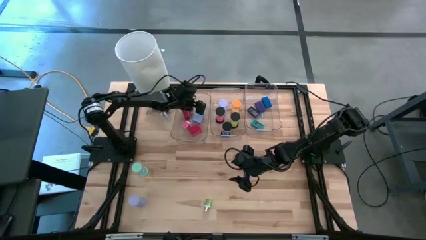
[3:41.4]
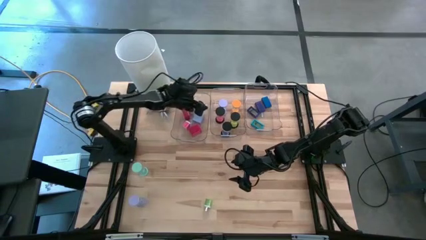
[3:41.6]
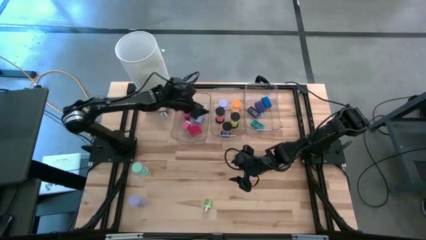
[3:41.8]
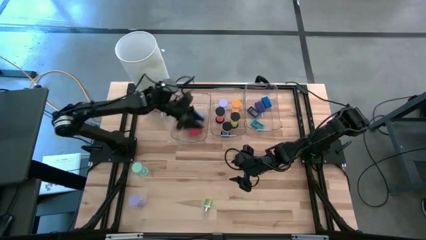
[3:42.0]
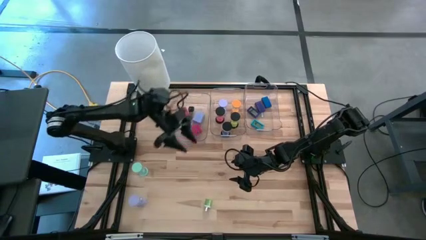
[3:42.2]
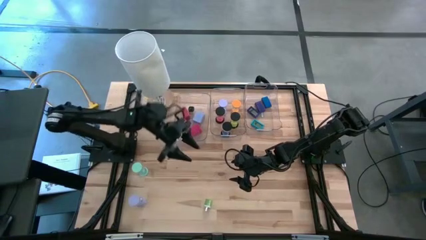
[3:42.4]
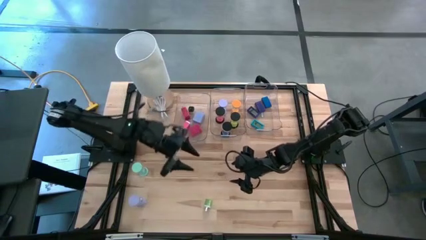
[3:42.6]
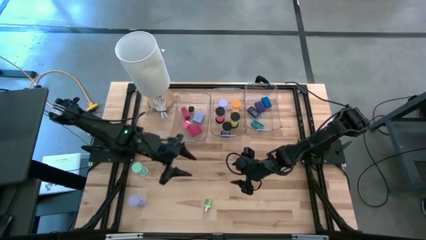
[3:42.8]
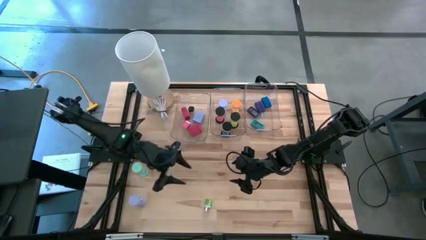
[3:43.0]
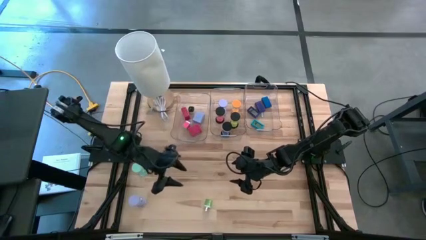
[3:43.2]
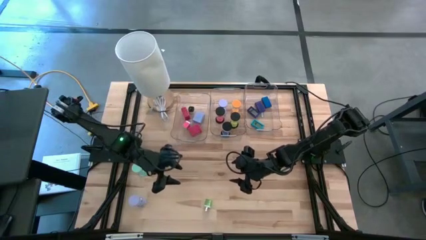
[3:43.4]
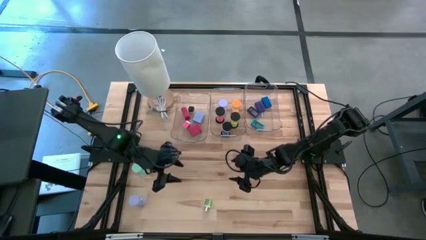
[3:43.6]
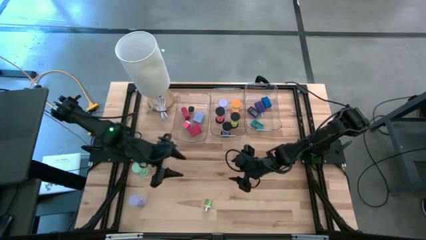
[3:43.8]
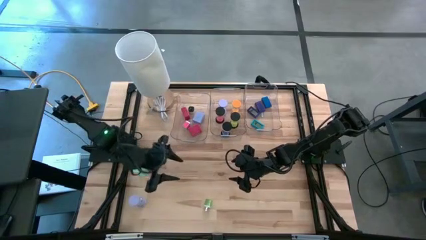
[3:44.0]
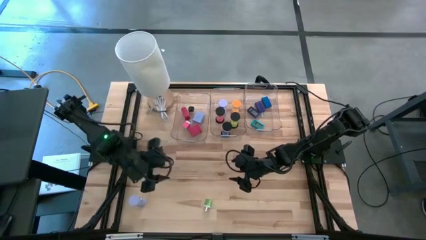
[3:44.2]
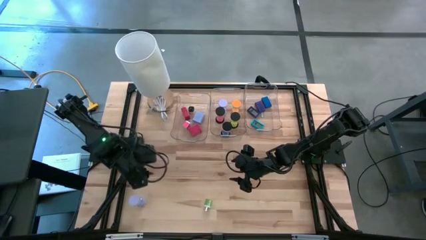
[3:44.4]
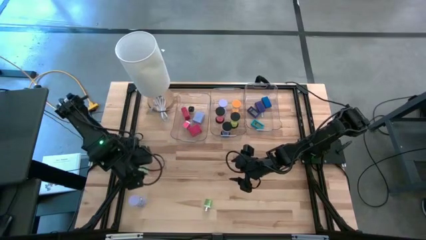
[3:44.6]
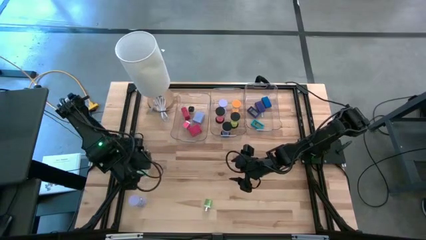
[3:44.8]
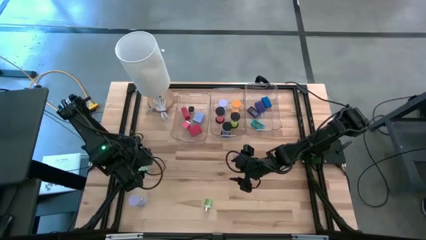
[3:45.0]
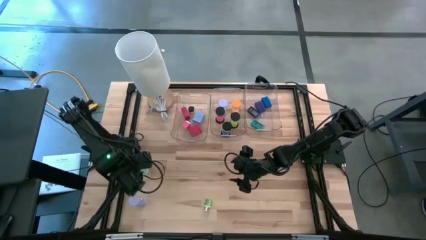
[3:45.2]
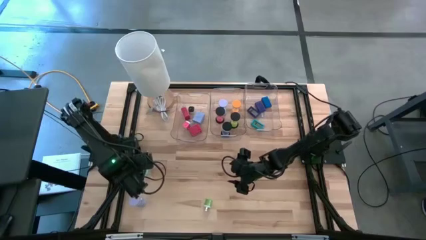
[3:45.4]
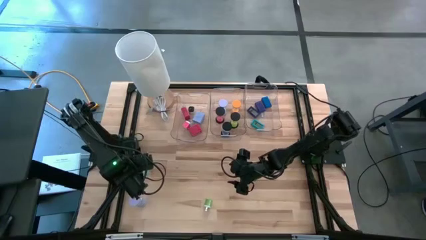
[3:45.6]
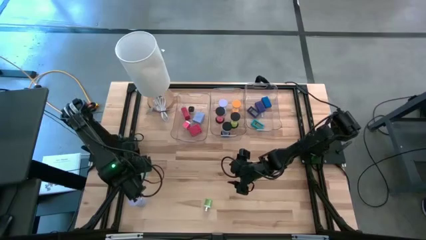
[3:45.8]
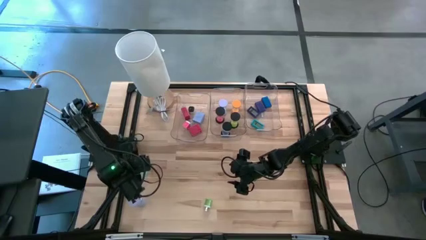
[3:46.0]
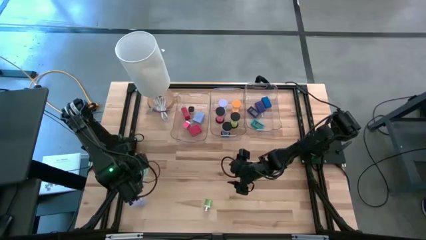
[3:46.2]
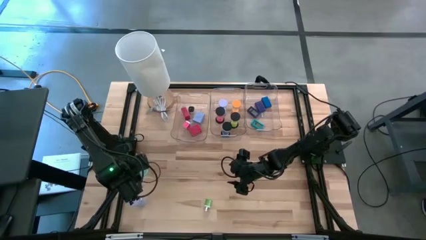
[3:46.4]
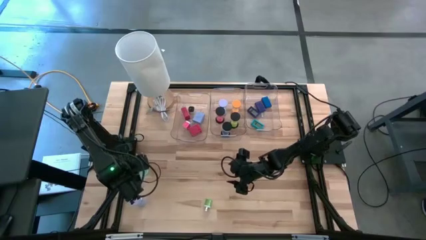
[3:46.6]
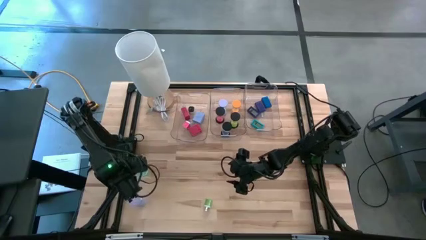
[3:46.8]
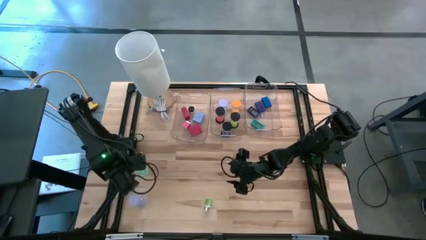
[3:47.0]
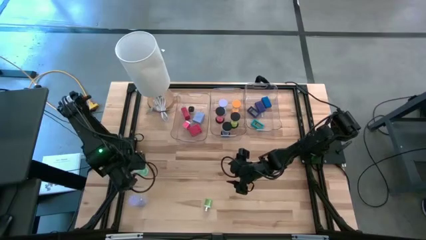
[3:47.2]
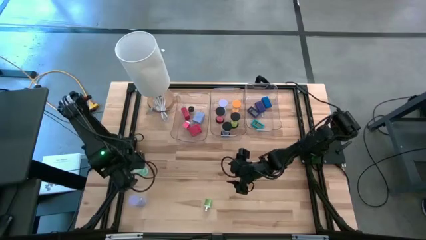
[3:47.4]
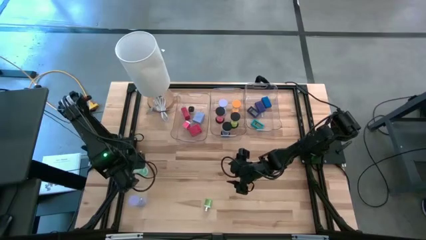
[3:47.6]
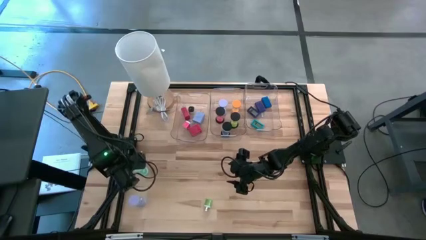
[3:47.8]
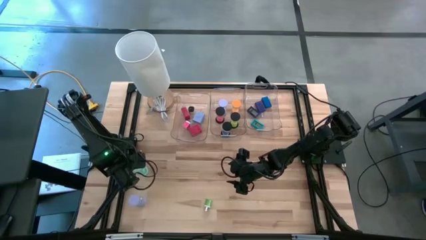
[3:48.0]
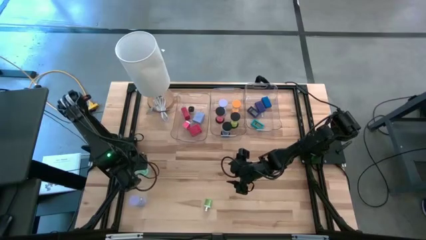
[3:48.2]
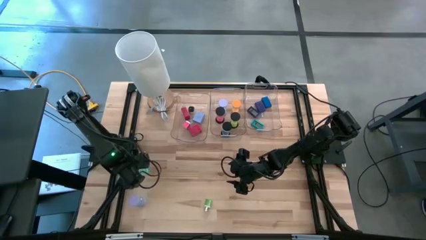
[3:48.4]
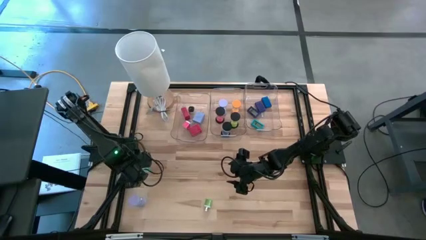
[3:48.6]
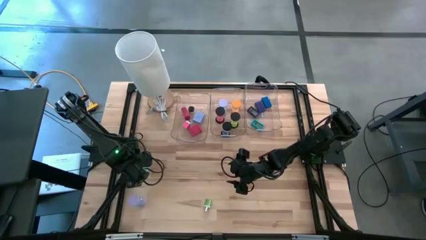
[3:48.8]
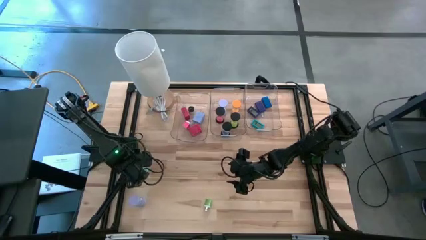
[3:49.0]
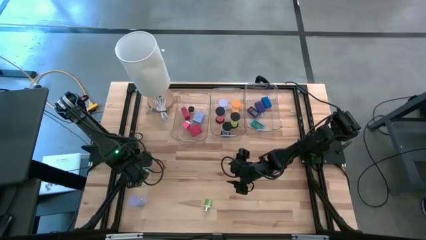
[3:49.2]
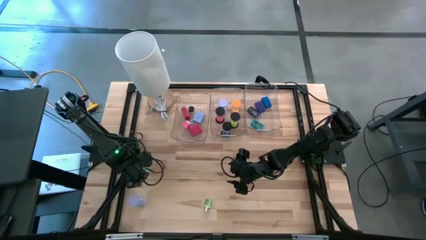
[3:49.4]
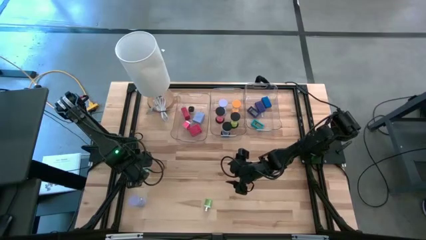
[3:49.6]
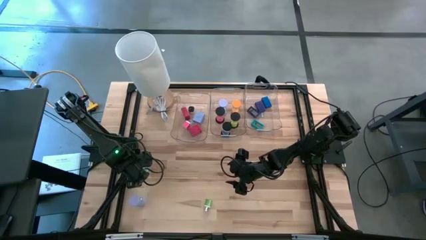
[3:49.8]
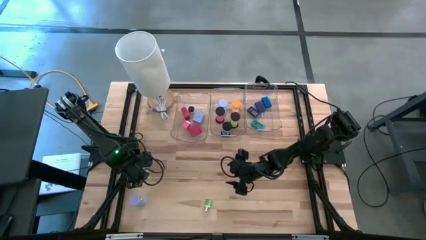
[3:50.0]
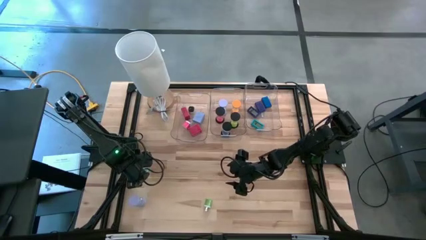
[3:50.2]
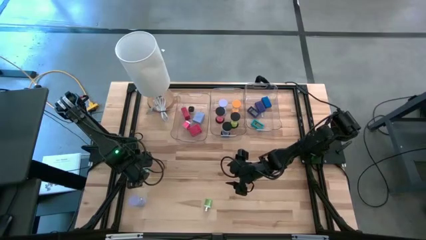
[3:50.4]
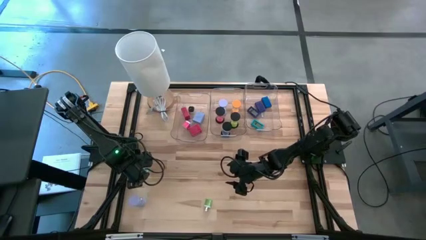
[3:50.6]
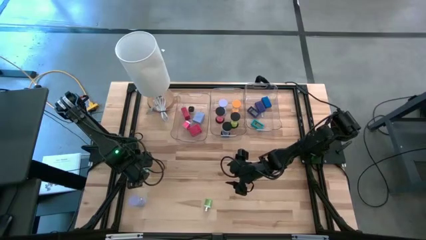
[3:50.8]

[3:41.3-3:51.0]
Task: Pick & Place Office items
Put the light blue hourglass into the middle transparent bin

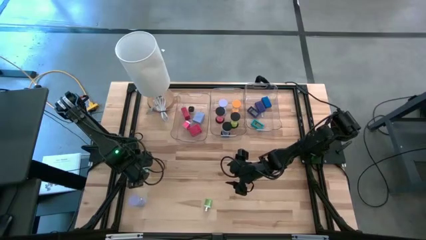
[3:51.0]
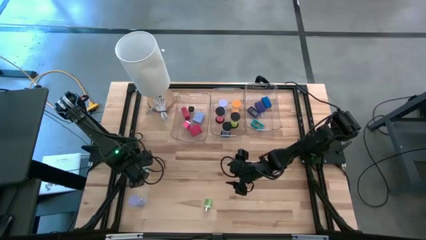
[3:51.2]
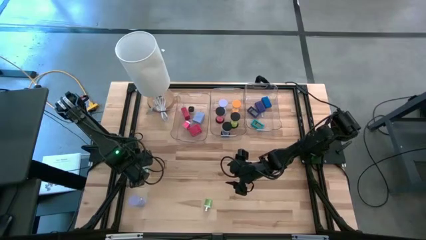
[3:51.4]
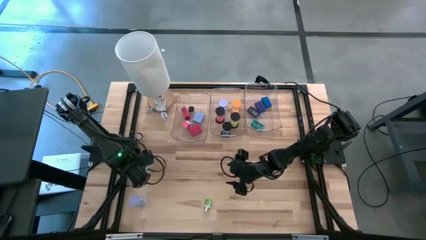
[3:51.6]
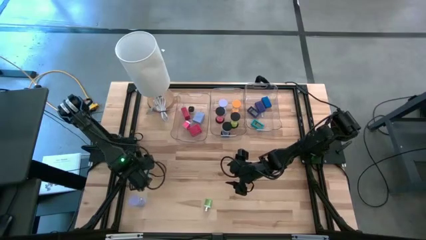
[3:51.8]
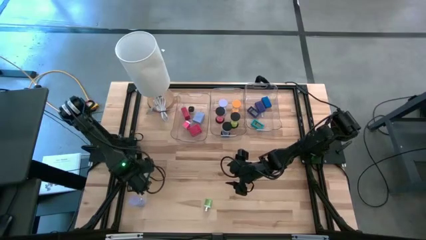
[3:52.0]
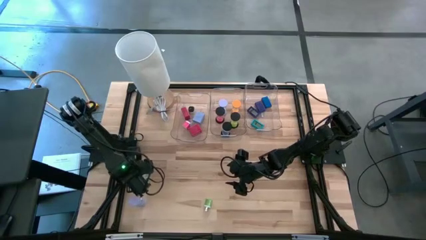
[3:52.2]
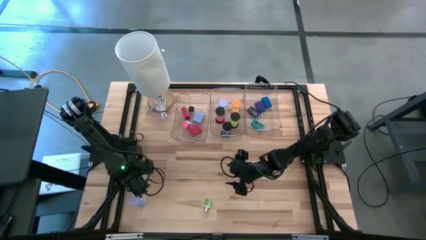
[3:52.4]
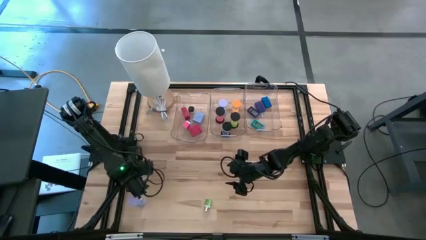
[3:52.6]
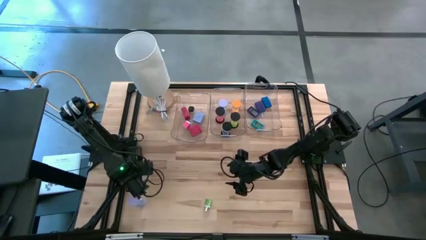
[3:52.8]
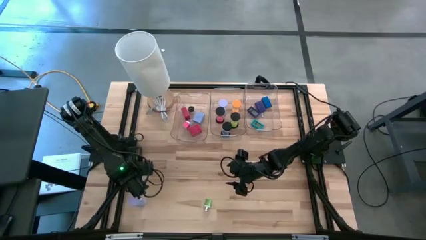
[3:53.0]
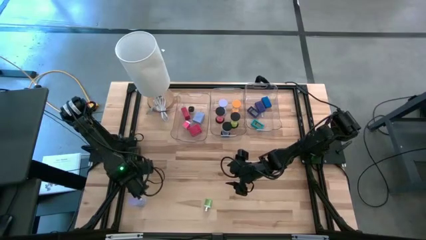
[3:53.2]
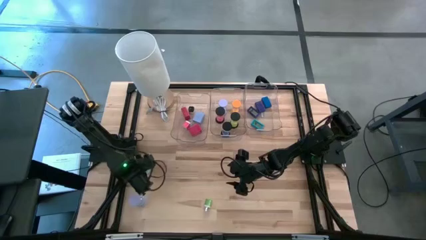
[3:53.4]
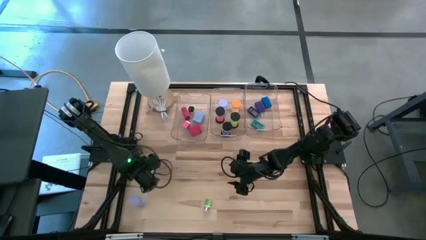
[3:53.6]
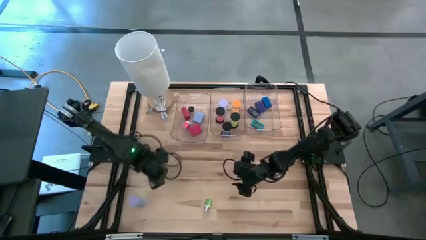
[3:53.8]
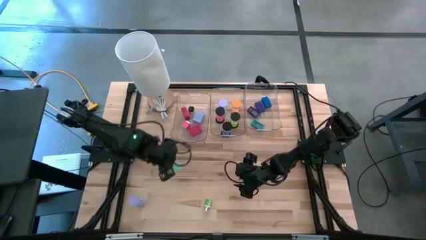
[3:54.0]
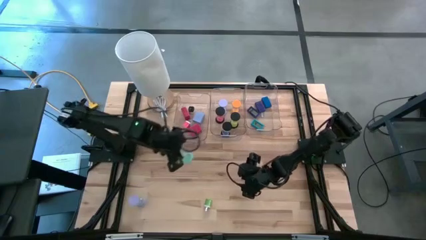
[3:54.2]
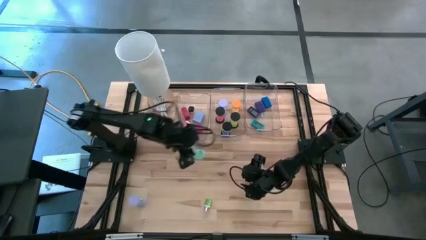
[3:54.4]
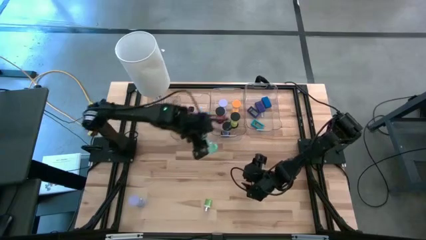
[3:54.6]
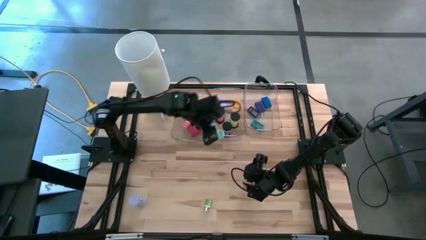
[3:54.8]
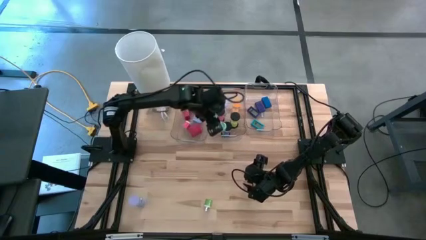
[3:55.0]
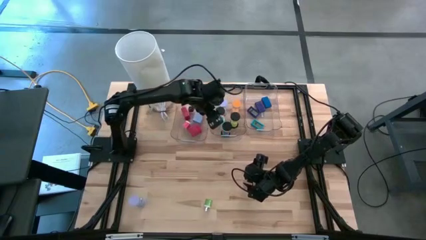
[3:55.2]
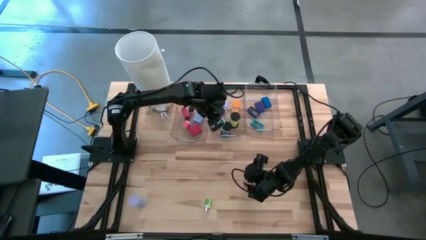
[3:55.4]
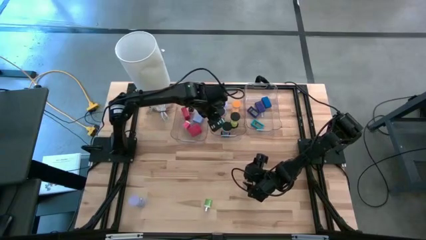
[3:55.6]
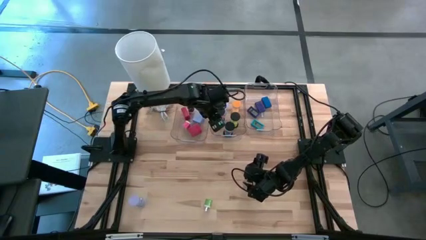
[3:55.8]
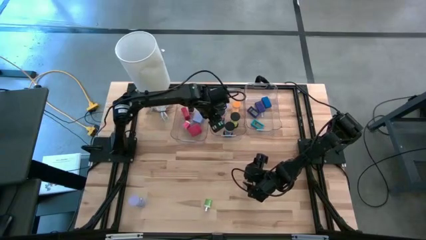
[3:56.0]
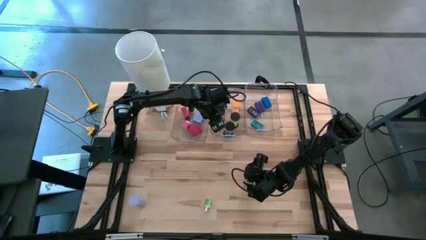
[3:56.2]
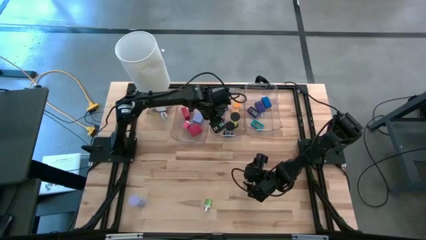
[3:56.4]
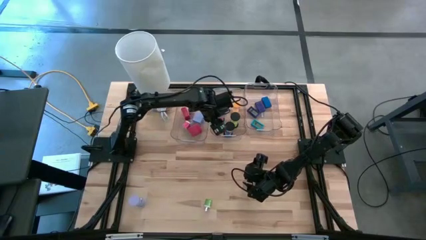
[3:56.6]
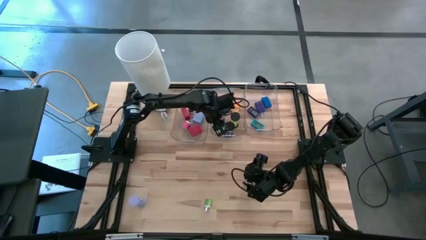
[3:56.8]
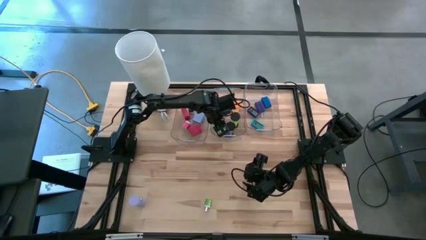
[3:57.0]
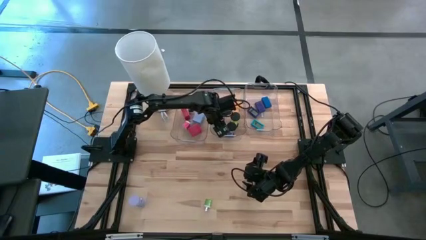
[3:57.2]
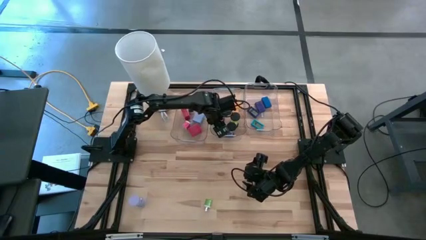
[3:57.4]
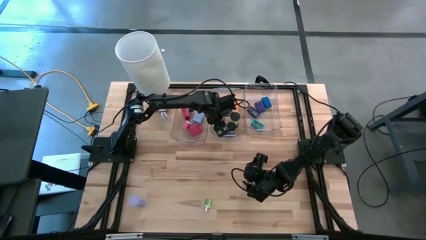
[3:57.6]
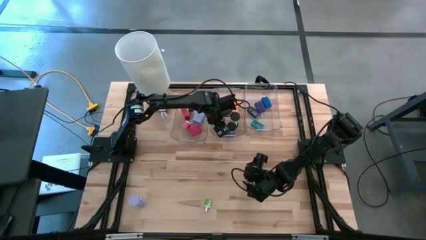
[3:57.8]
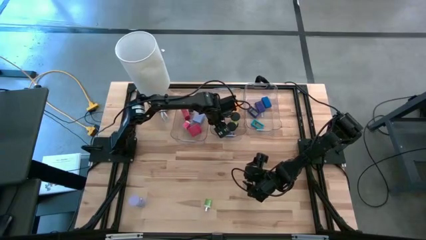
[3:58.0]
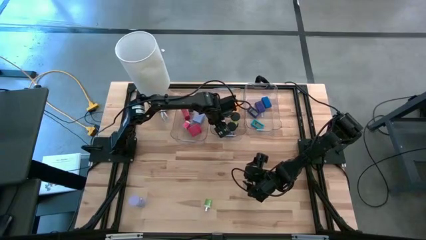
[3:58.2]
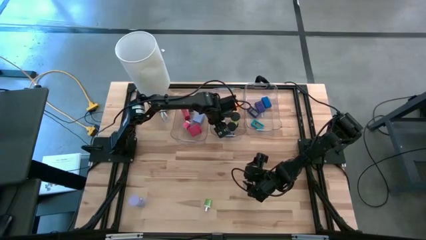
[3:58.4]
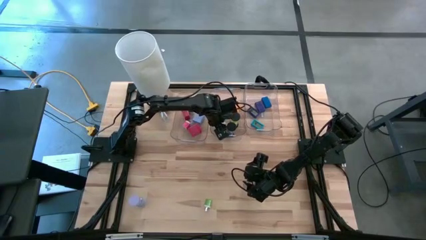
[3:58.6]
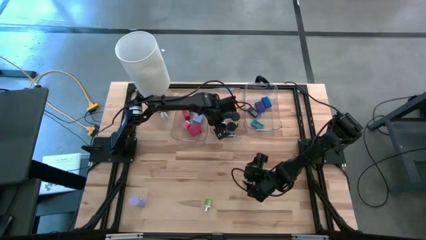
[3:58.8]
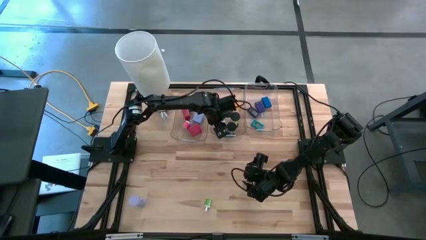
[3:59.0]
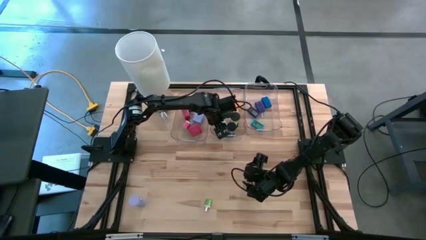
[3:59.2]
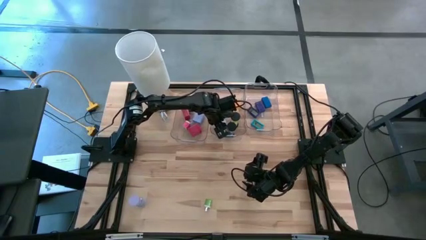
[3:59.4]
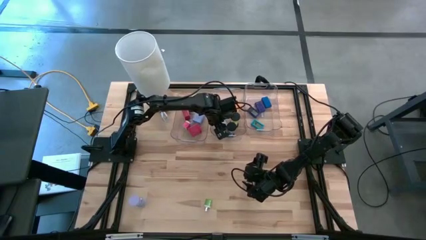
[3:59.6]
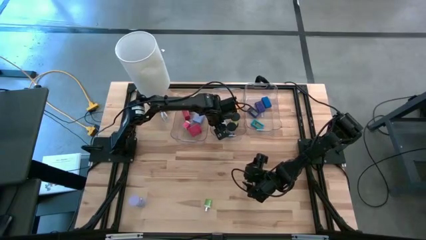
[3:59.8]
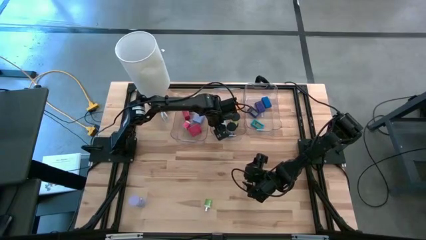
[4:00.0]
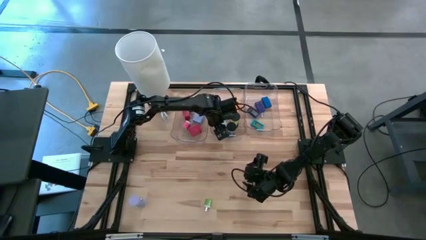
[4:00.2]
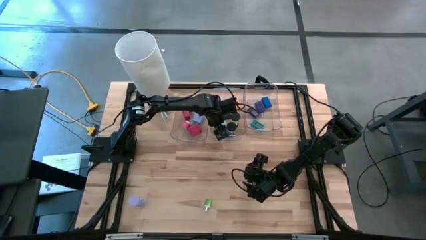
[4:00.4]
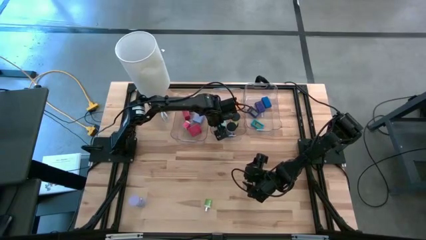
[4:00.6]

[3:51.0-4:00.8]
Put the light blue hourglass into the middle transparent bin
